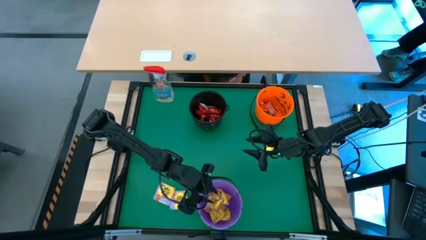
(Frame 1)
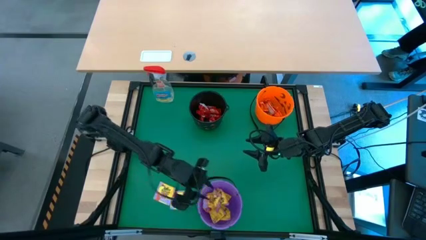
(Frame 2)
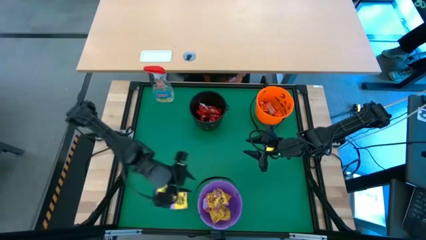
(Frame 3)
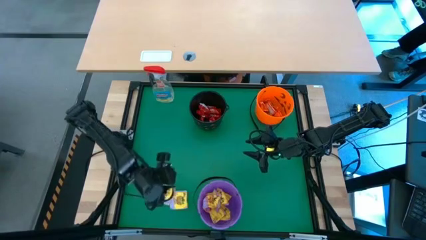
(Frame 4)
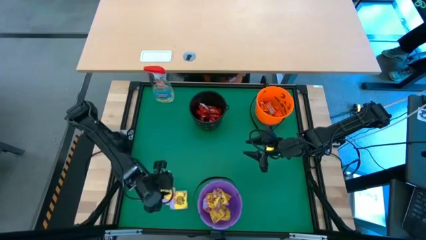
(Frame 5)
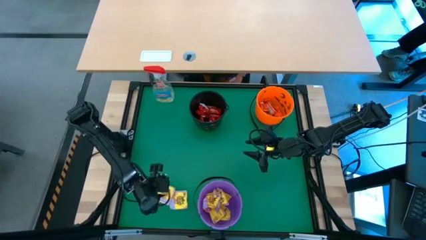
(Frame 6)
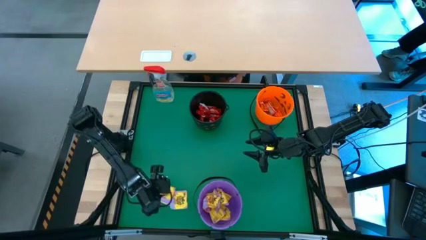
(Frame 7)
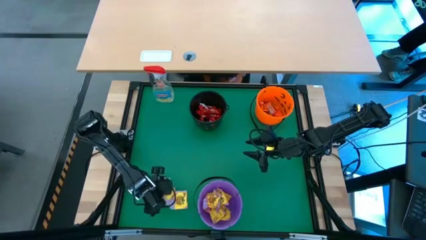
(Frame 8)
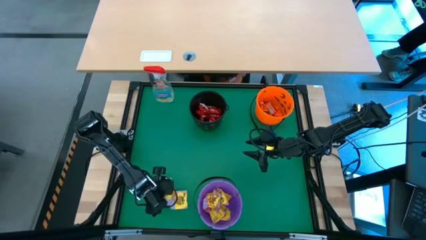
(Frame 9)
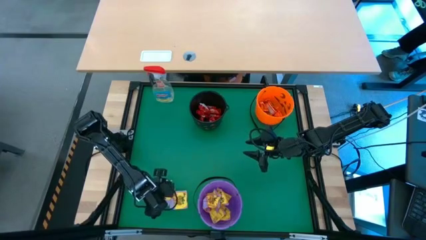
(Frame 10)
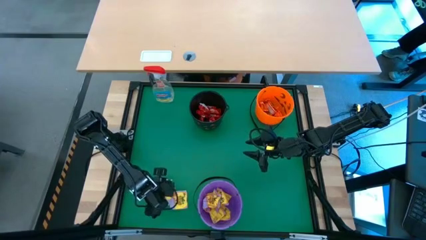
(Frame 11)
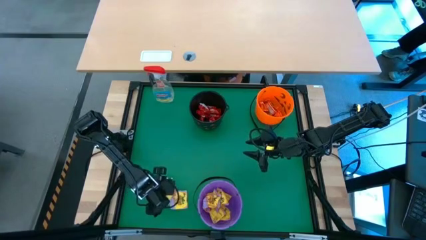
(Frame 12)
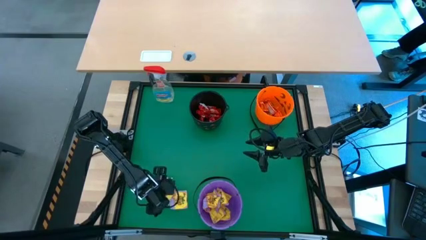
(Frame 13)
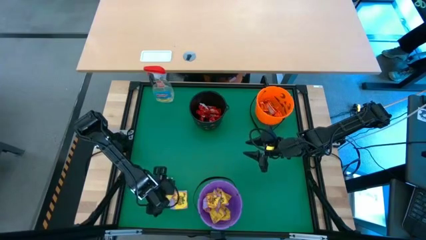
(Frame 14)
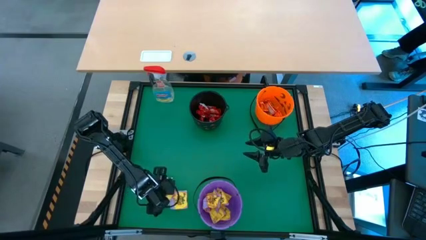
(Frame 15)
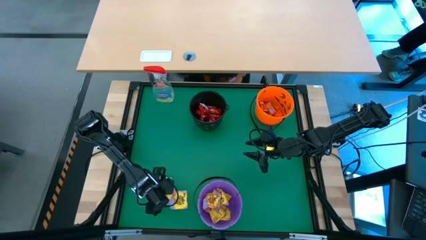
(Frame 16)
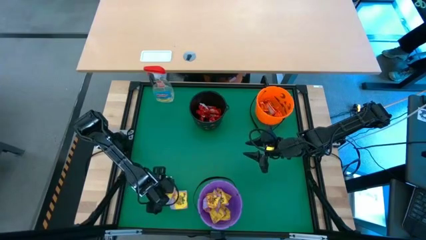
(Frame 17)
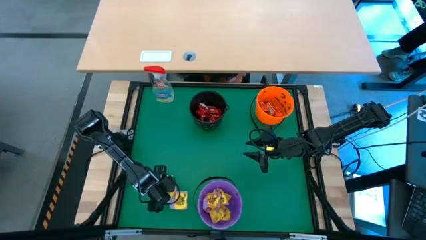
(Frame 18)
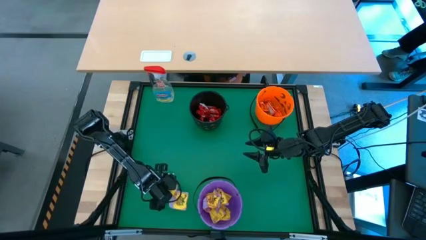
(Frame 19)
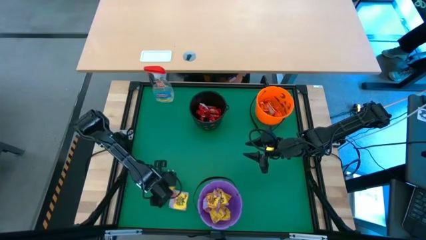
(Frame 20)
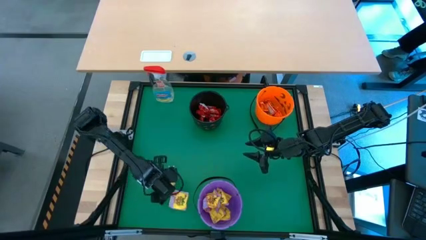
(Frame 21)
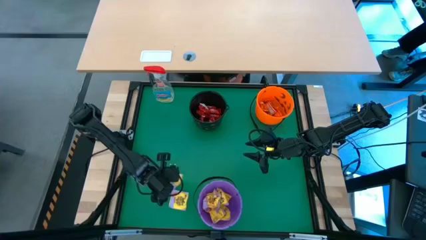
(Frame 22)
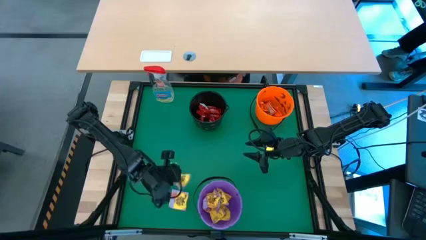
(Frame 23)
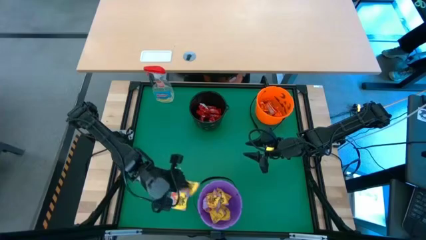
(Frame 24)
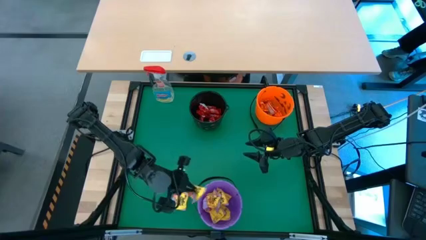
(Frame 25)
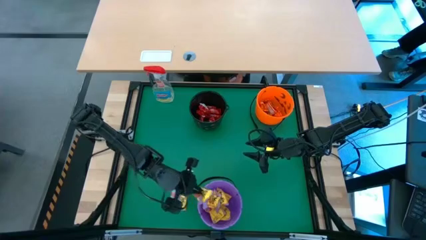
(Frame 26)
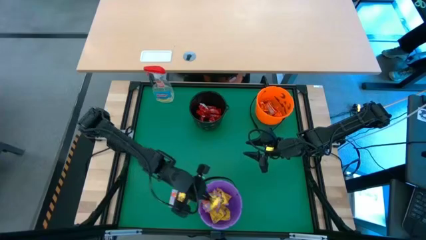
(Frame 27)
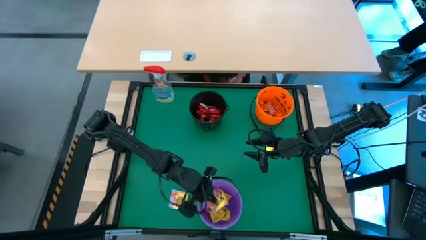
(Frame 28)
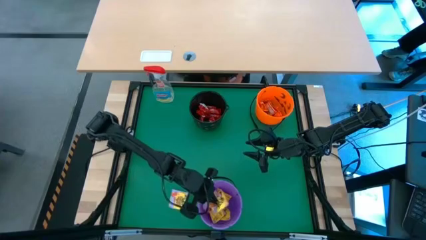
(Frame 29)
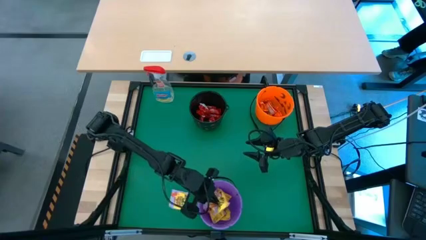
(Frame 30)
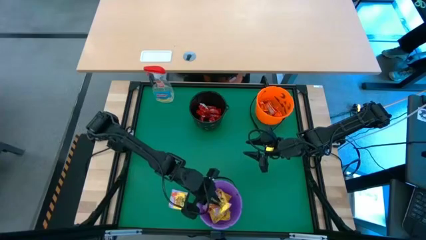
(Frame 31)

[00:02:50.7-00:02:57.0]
Task: Sort candy
Put the yellow candy into the violet bucket

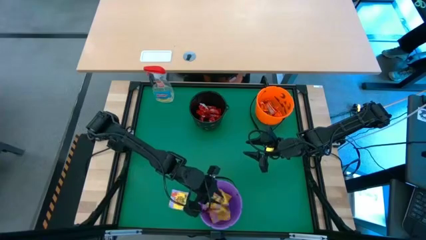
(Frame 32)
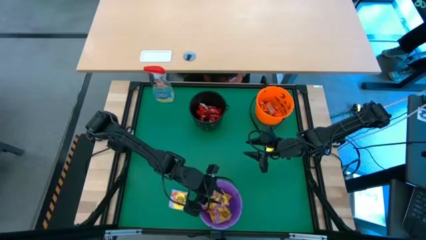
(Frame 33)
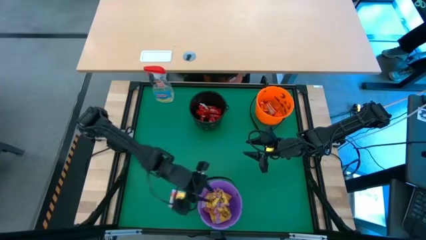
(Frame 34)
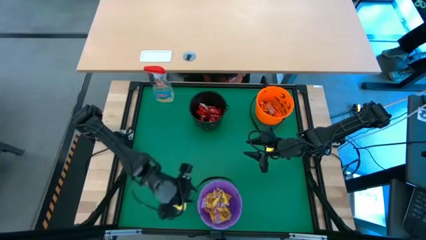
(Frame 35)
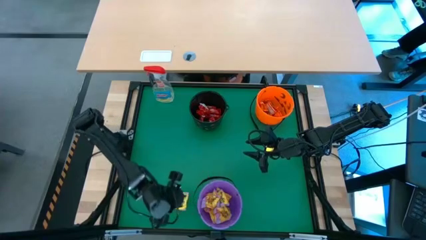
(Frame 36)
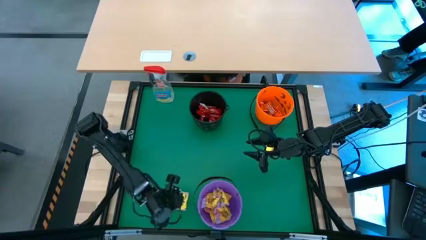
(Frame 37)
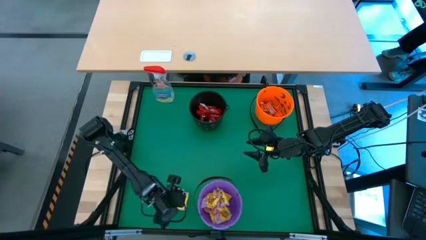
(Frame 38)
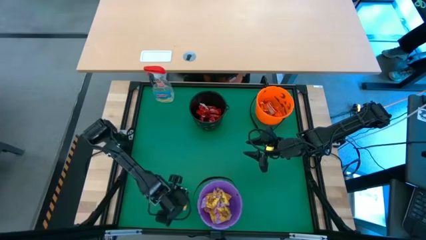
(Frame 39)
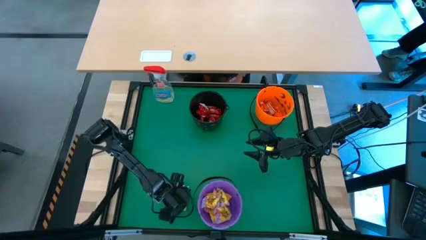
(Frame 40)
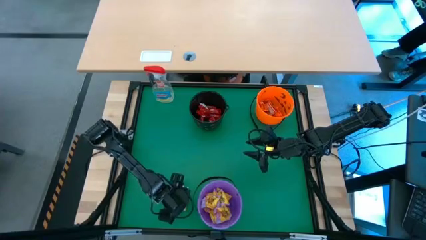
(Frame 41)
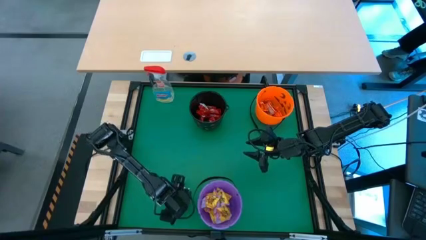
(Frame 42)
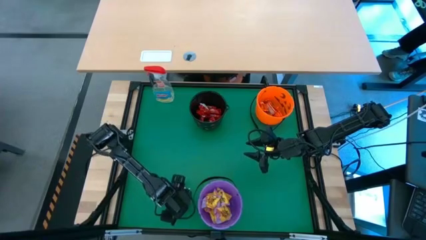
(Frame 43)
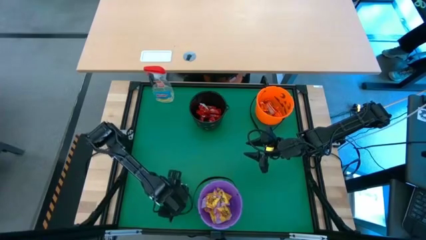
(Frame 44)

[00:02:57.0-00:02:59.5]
Put the yellow candy into the violet bucket

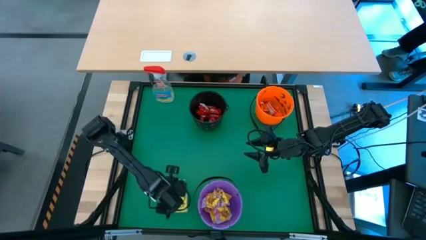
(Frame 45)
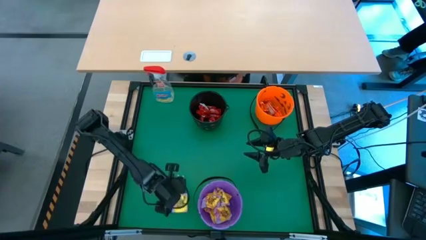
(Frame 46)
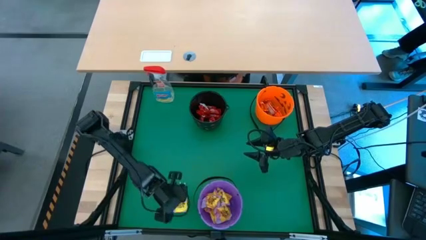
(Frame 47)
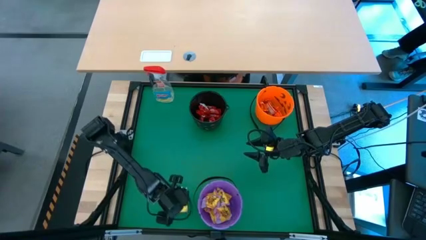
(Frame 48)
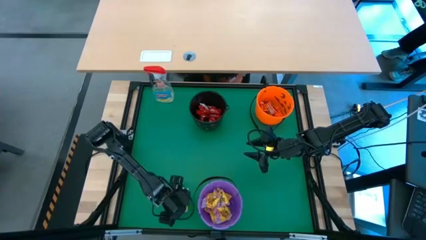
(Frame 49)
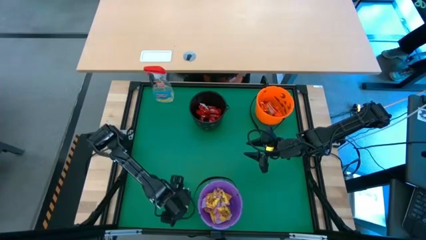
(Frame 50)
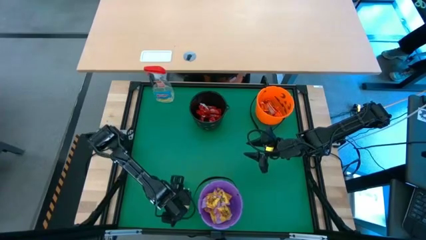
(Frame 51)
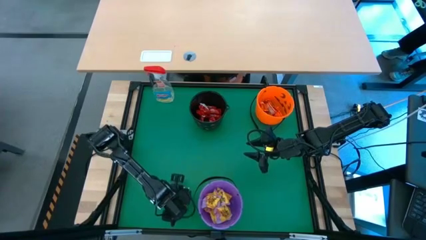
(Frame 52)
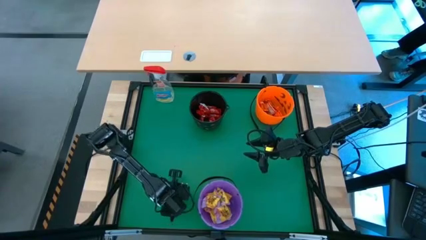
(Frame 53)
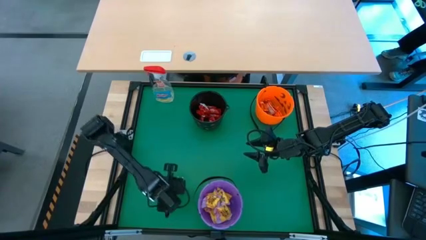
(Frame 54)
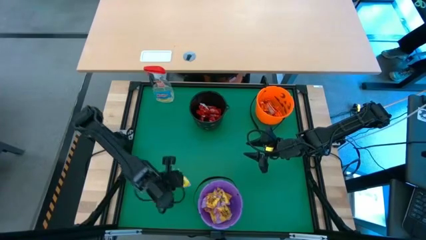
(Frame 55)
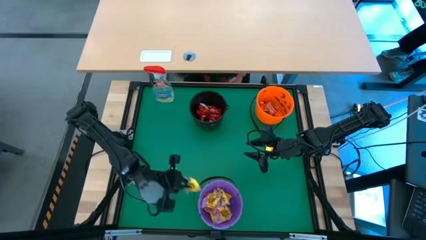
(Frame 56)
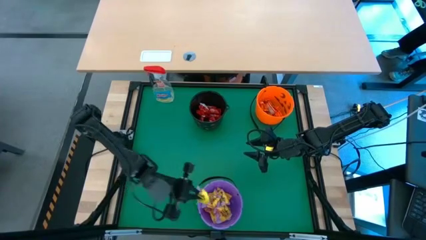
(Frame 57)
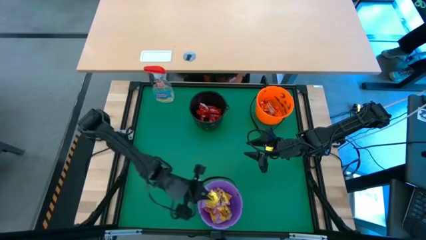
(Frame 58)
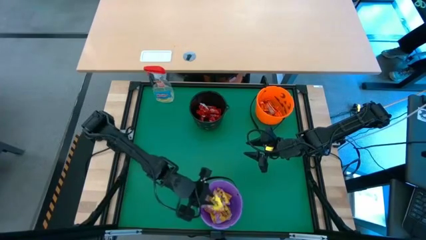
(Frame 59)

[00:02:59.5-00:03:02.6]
Put the yellow candy into the violet bucket

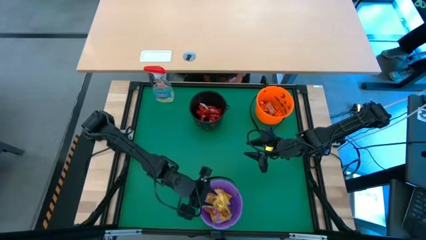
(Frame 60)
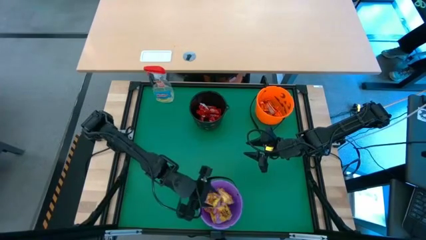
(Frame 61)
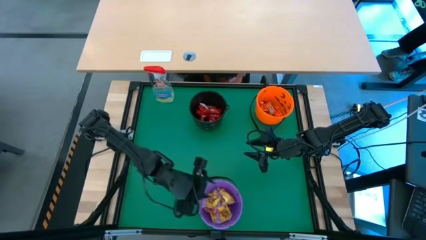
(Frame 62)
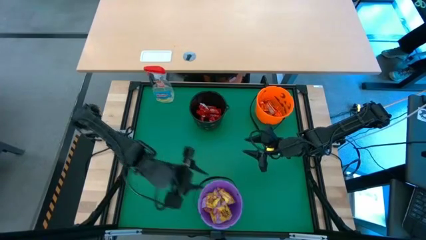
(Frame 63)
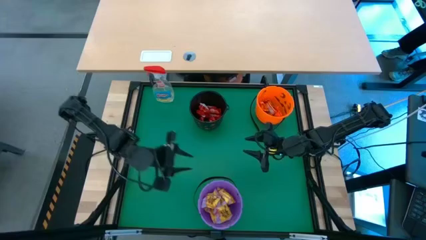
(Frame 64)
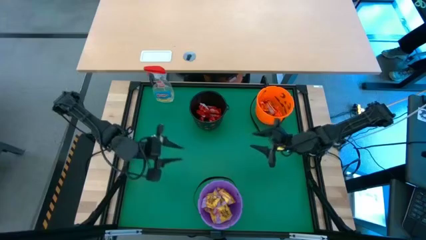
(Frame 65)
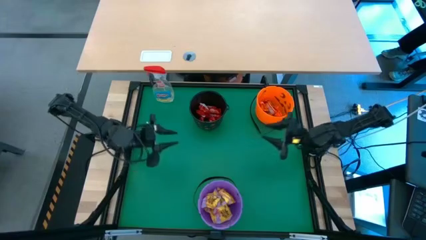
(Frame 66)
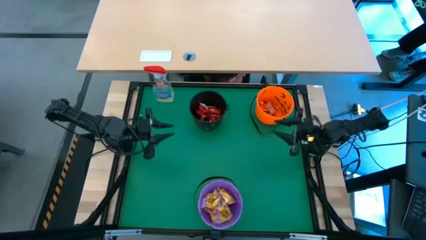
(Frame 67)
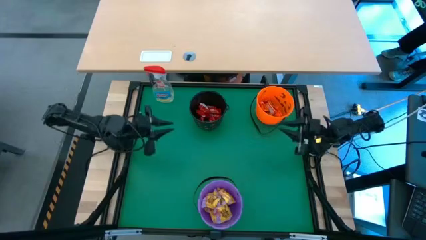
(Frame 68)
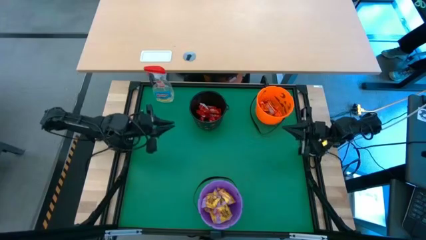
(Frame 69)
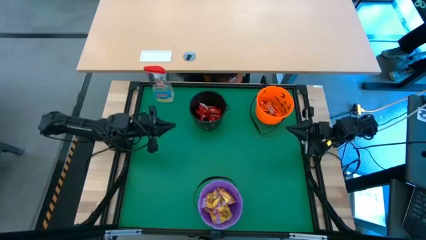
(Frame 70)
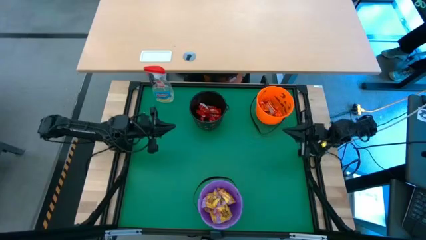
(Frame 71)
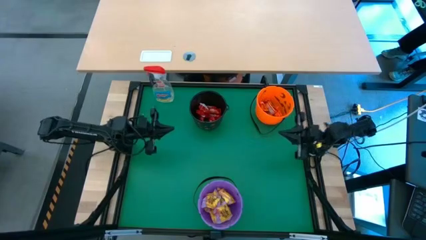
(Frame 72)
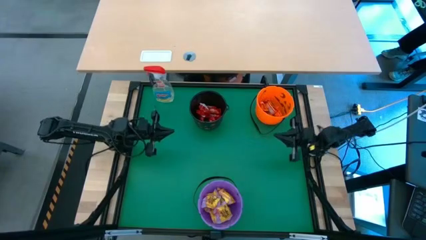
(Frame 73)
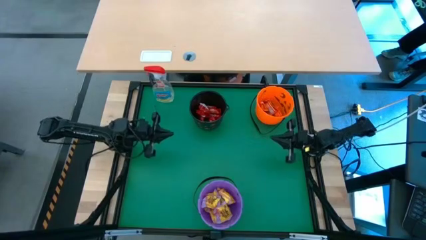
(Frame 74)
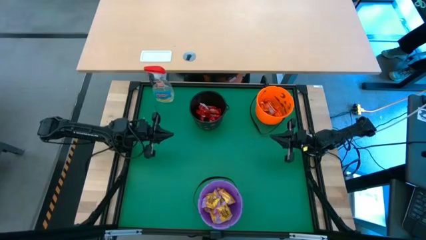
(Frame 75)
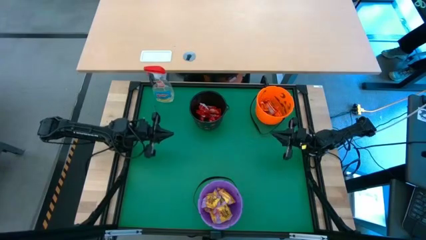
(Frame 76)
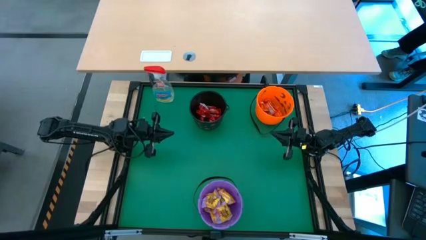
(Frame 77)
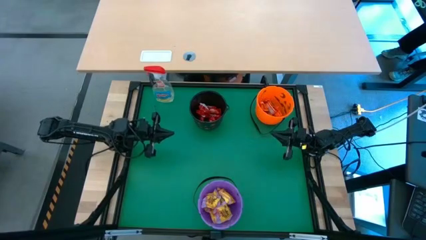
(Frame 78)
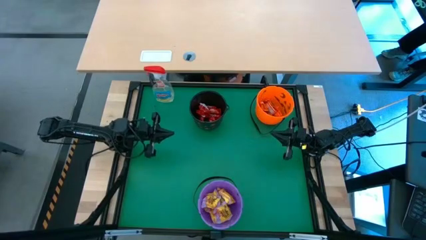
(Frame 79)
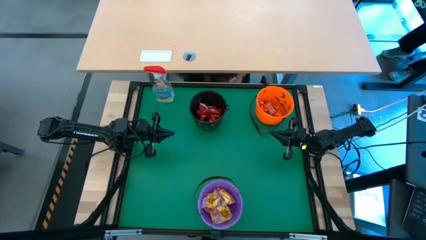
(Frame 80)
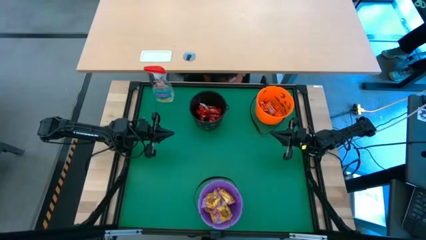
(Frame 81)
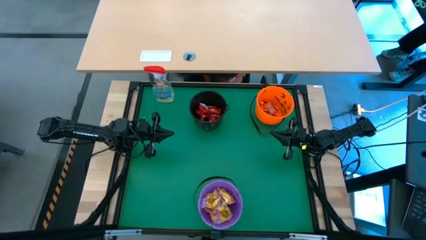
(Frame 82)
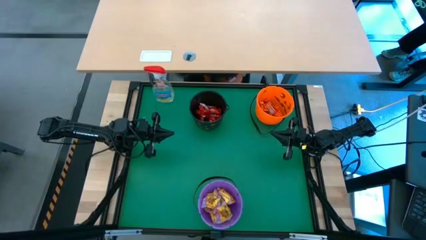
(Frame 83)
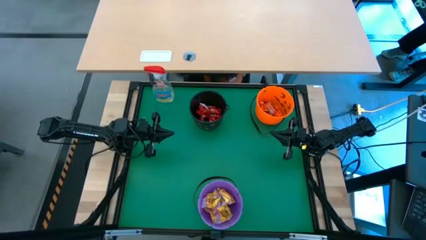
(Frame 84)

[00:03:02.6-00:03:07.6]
Return to Home Position

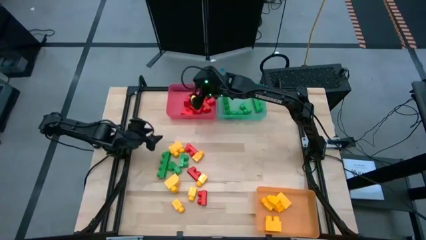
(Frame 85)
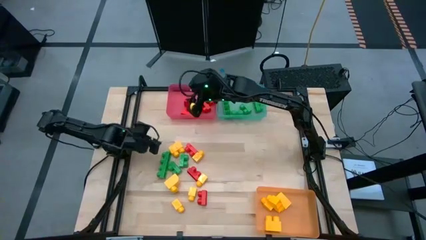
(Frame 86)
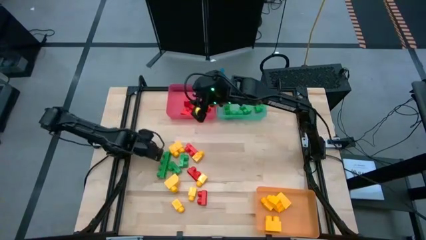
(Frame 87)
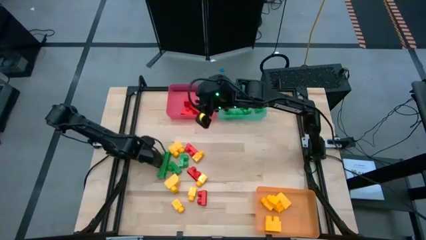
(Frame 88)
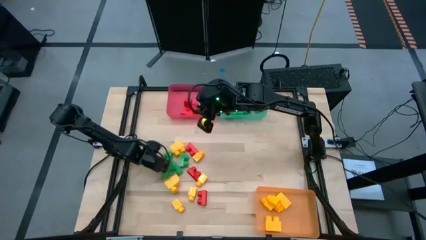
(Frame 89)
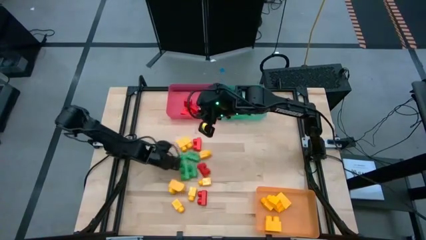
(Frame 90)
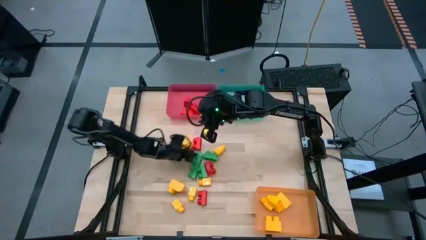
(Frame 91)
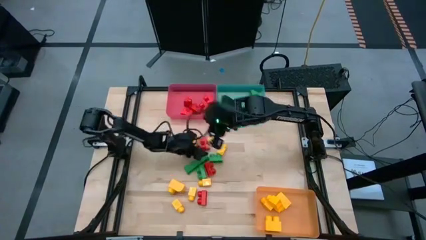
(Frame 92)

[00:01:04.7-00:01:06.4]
Task: Sort blocks
Move the green game pieces from the middle left to the center
